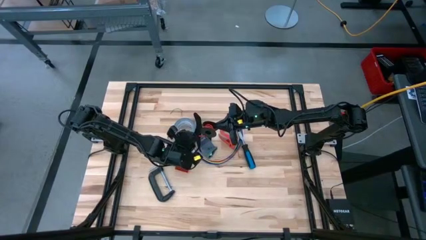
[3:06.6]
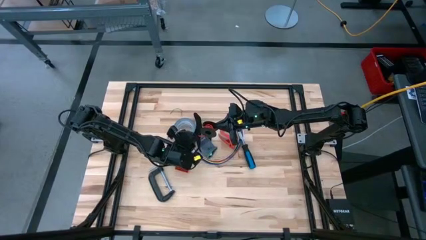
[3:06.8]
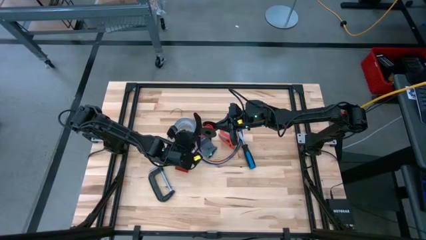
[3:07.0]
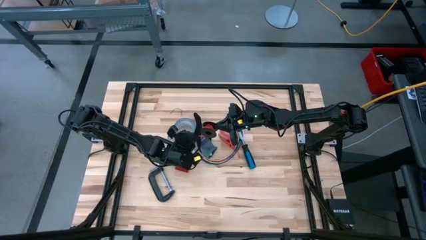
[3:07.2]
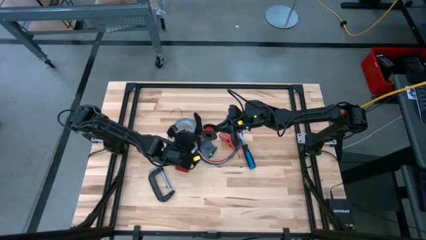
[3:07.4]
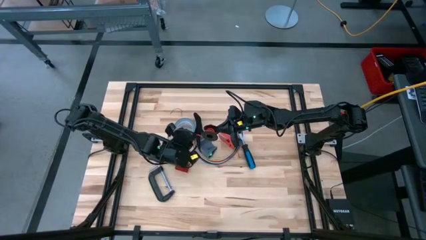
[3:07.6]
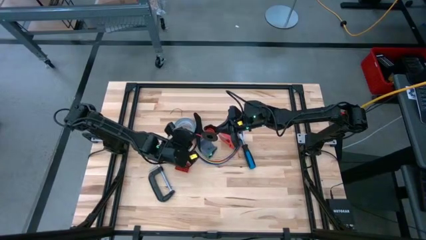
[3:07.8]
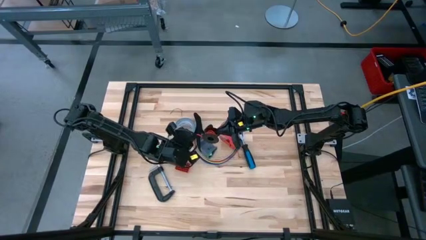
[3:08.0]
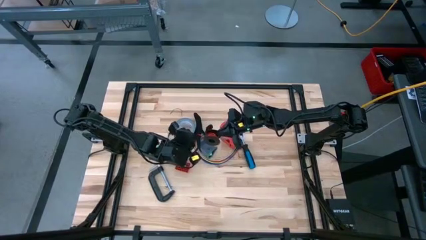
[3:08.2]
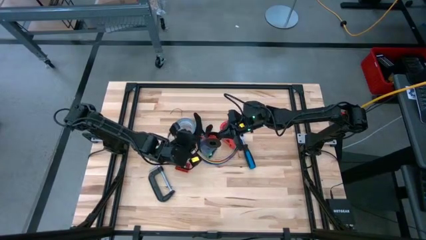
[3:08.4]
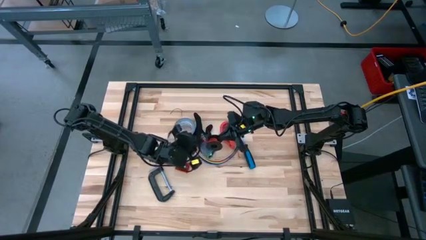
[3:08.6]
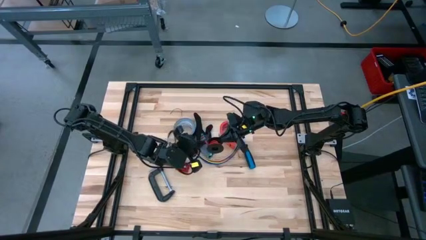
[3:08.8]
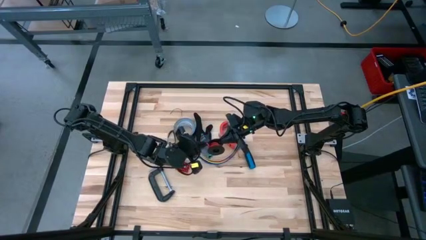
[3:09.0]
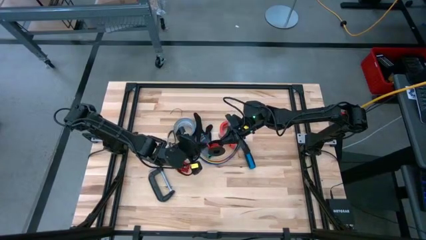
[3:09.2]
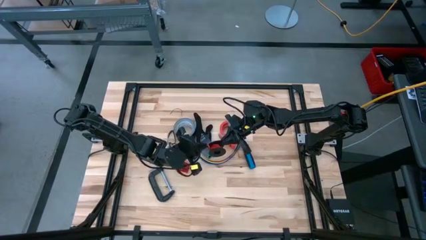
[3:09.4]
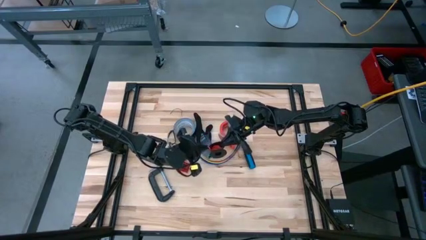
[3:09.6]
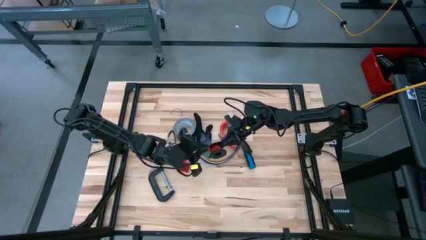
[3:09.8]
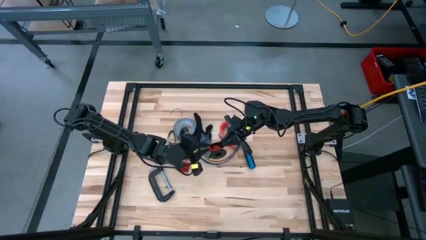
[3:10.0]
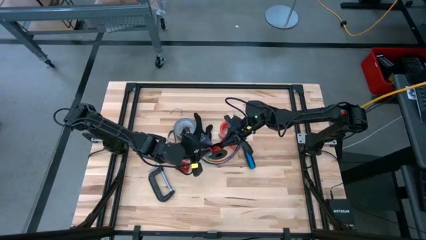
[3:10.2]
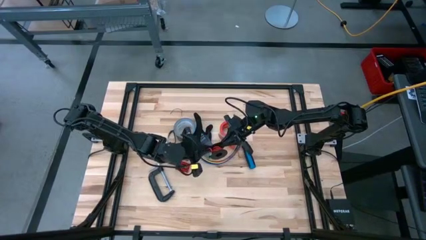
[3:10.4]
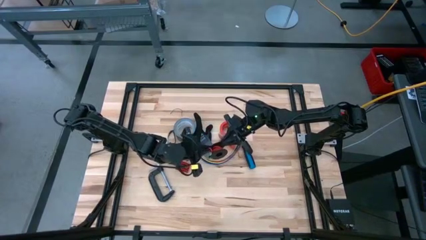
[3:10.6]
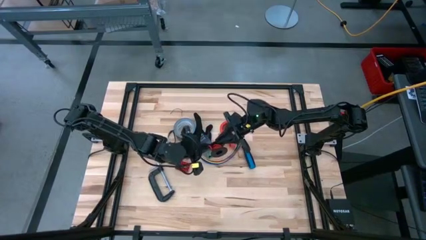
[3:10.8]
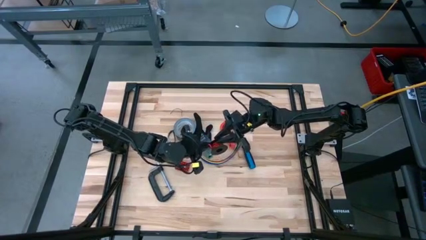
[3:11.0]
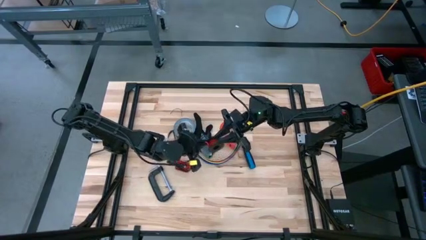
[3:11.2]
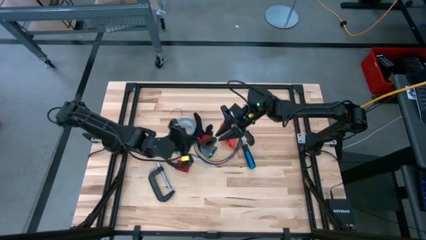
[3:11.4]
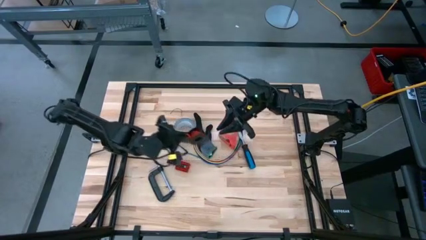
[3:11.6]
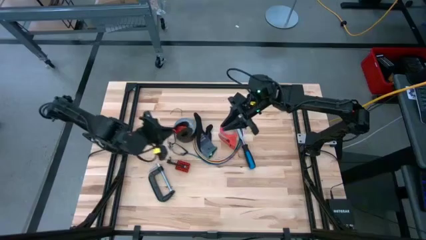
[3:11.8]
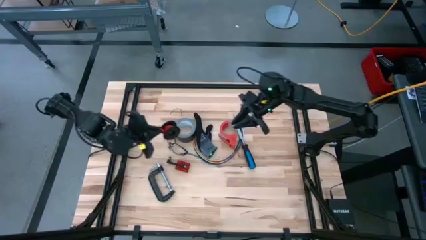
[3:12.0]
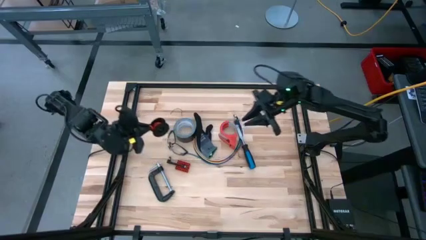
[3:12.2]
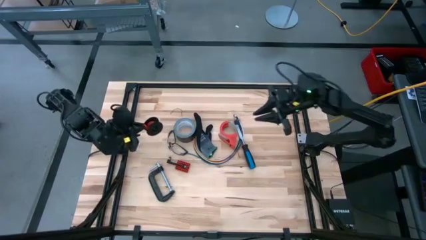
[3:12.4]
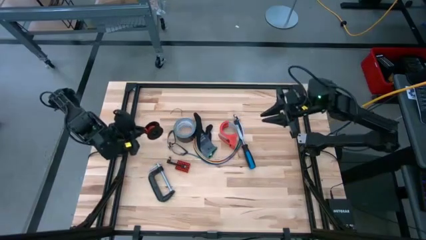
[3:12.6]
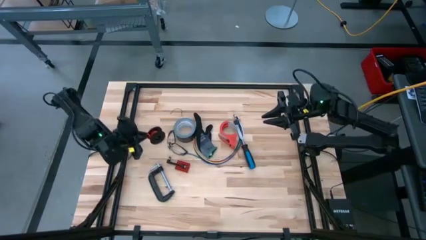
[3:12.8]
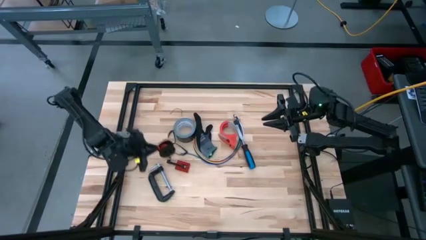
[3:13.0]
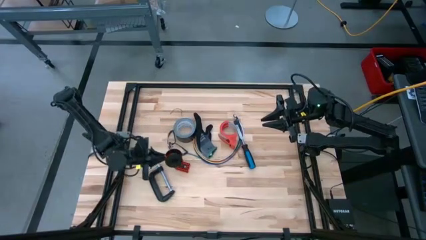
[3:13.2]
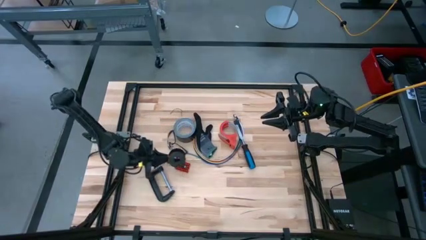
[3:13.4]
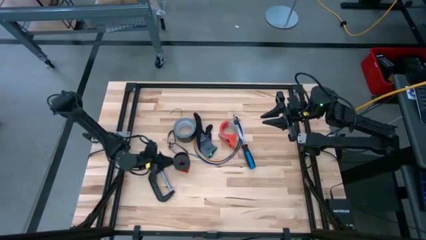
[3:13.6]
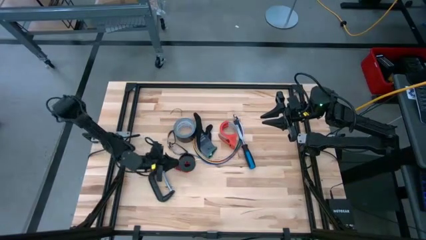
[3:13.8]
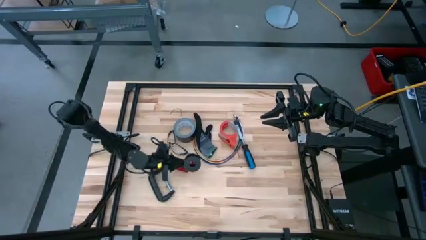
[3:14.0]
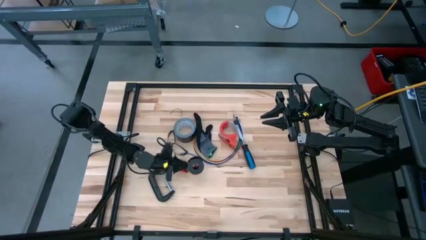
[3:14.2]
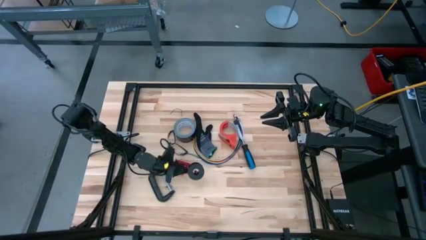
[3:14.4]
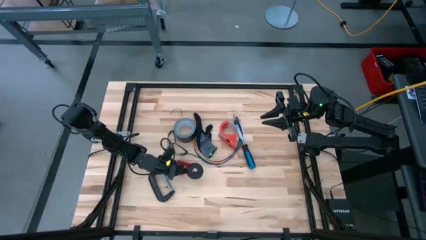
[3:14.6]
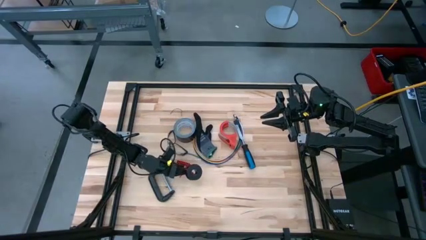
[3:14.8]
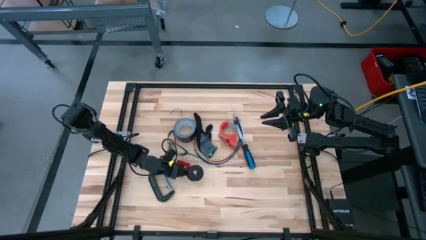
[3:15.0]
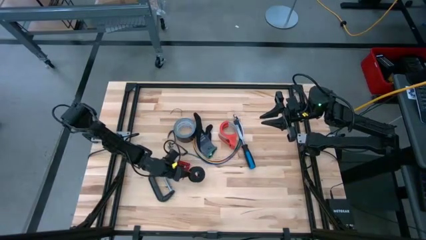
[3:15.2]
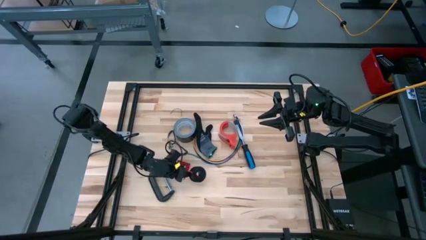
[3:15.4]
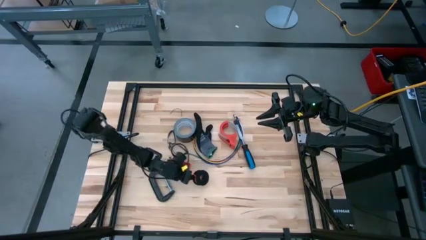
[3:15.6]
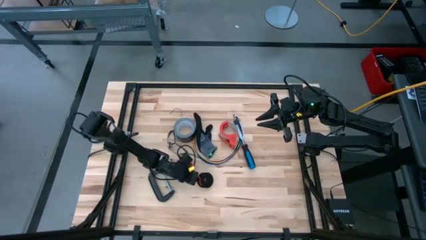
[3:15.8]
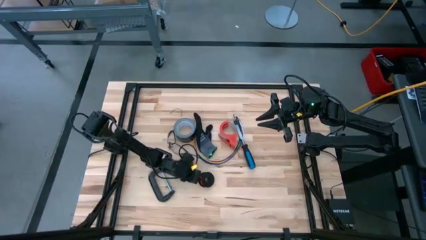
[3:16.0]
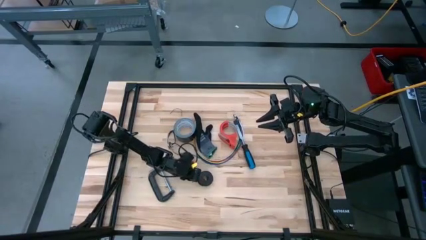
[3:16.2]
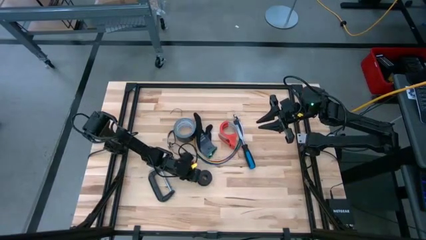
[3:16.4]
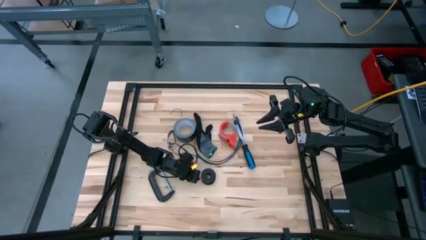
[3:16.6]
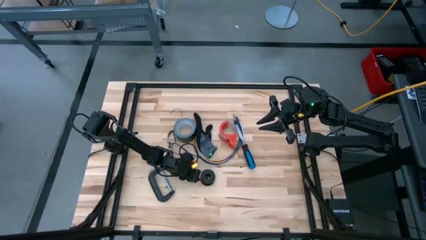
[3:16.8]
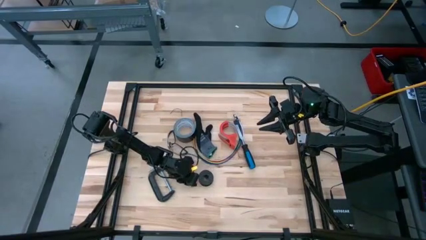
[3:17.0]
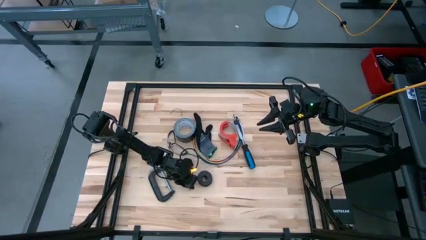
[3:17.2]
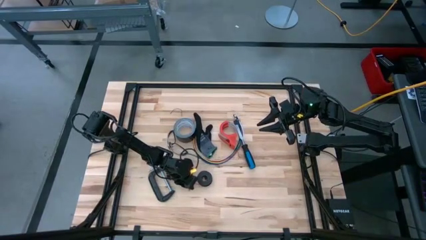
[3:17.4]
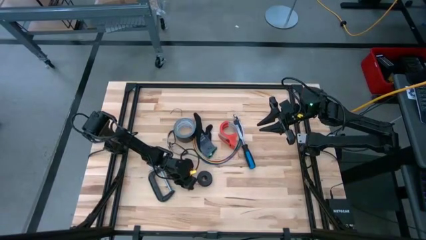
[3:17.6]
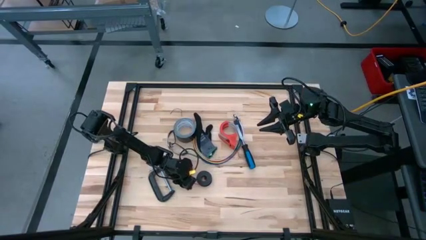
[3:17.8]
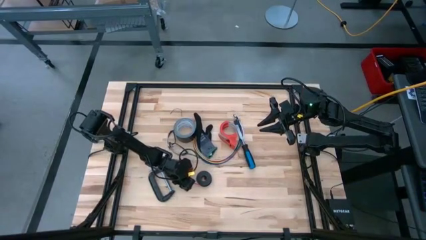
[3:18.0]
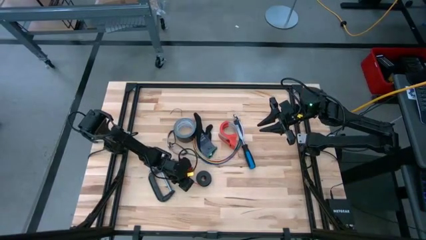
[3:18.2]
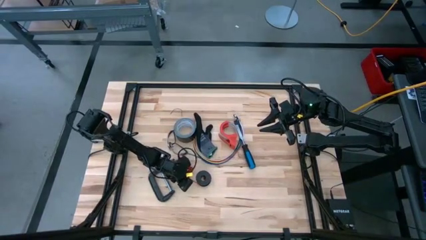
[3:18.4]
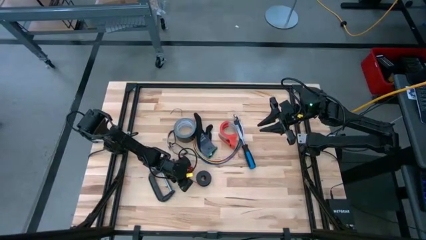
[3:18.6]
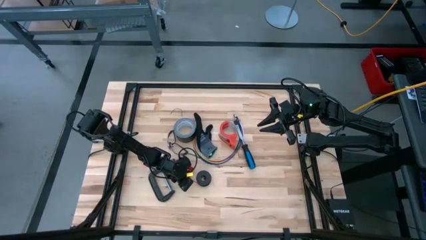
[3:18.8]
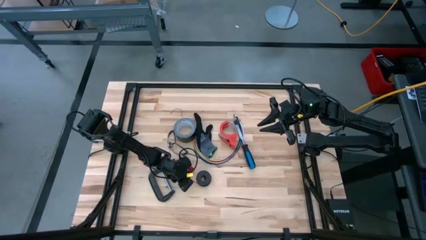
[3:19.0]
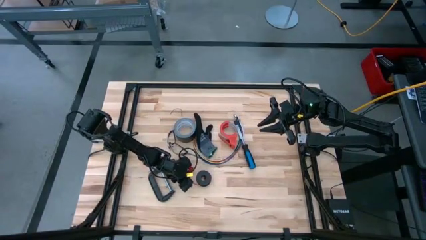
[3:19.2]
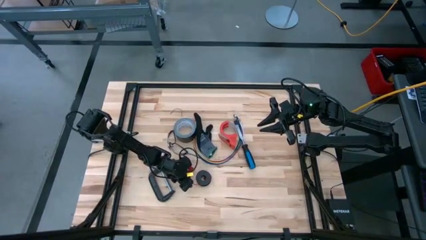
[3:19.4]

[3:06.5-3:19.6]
Task: Coil cords
Coil the red wire cable onto the black spool

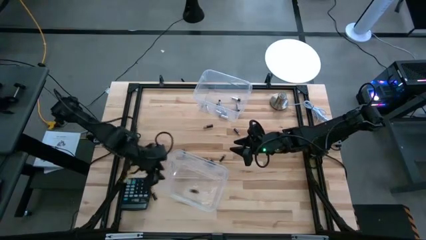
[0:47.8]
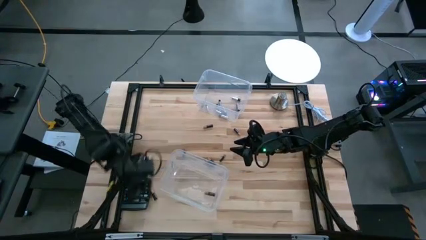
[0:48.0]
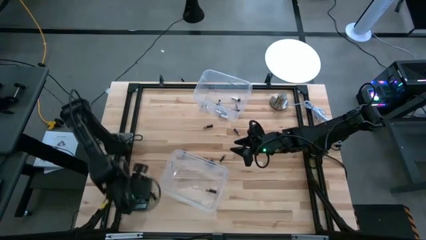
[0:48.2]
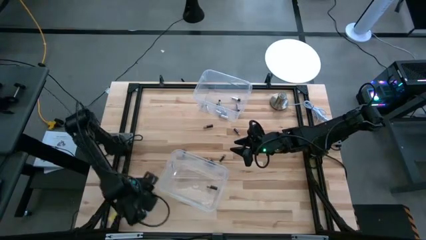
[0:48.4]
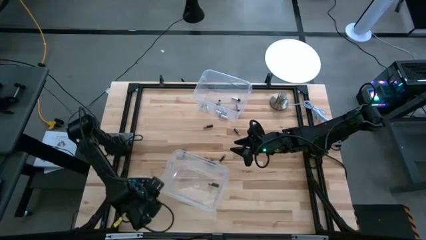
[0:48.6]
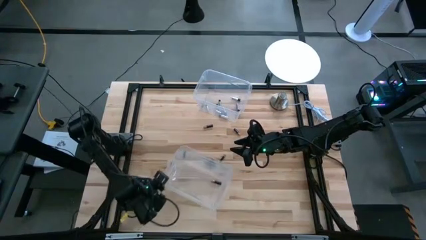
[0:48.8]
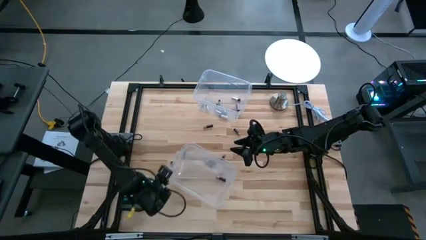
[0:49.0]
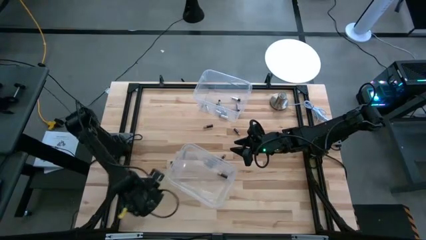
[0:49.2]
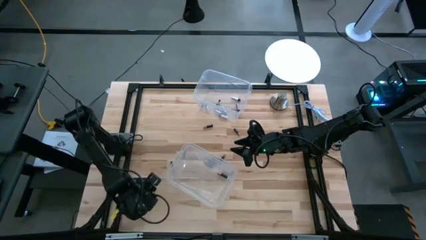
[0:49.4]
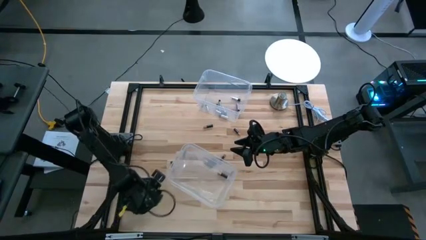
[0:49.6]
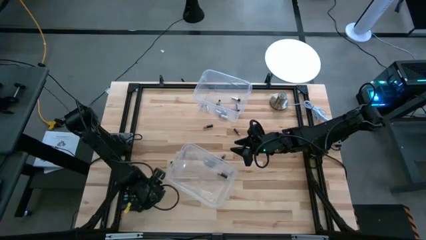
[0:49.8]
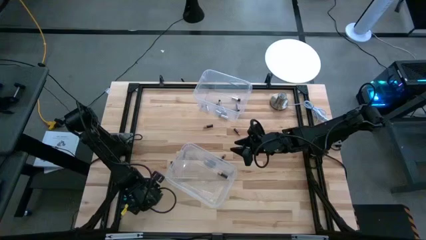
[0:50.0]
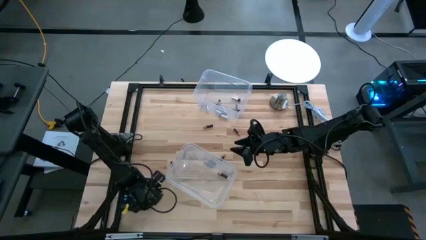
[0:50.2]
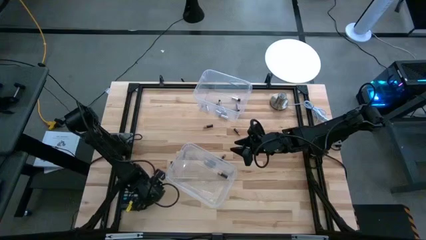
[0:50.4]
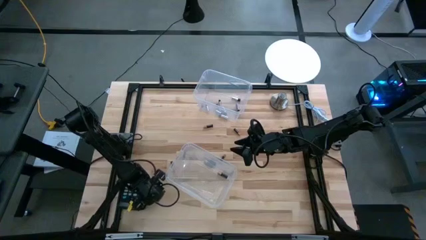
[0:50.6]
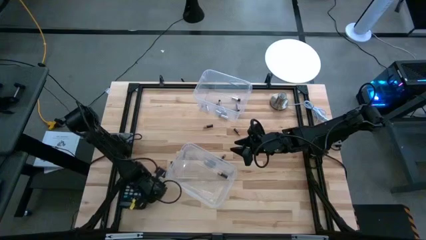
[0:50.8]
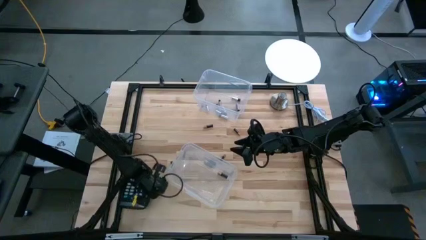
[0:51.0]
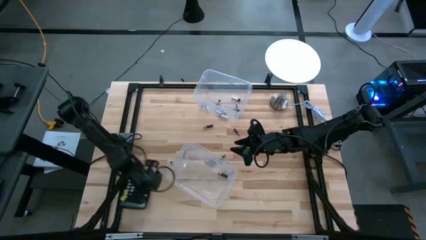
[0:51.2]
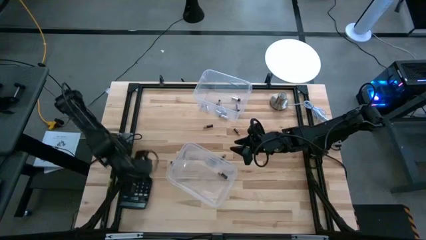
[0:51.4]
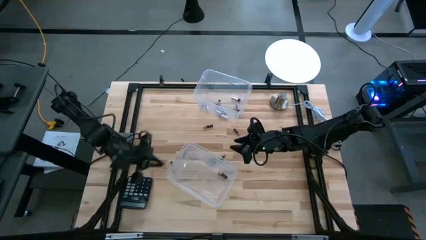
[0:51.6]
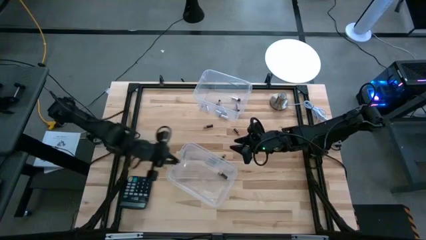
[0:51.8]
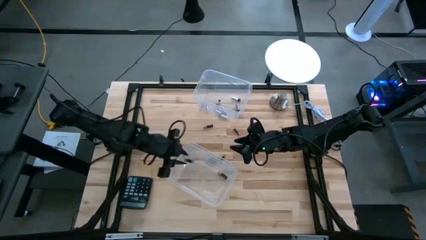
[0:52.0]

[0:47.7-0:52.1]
Task: Sort batteries
Put the black battery into the bottom transparent bin
